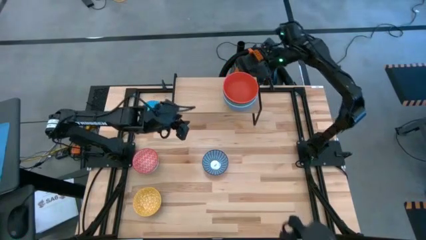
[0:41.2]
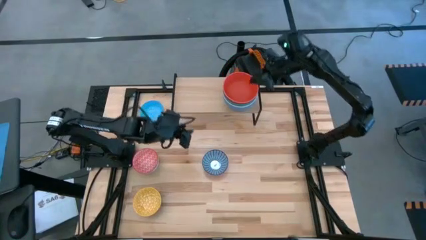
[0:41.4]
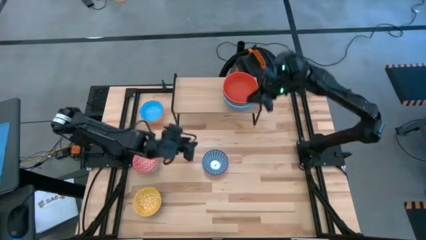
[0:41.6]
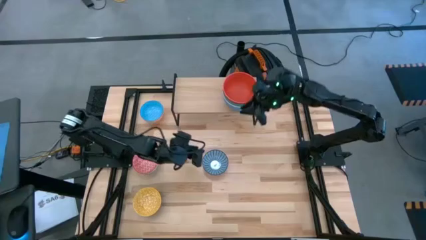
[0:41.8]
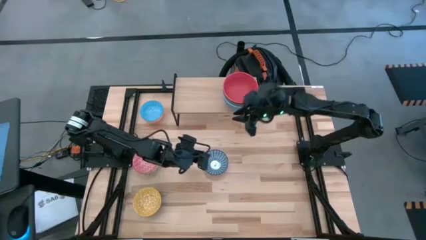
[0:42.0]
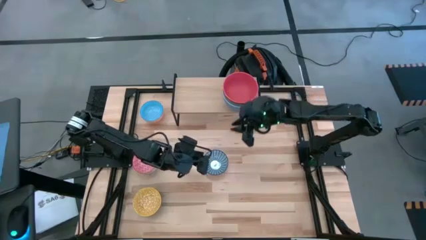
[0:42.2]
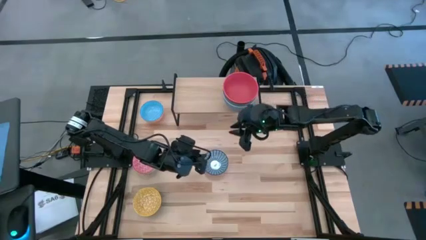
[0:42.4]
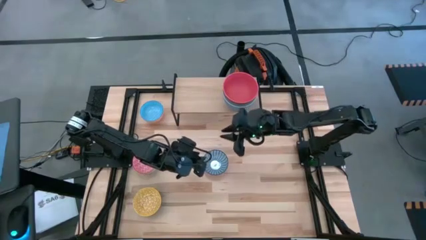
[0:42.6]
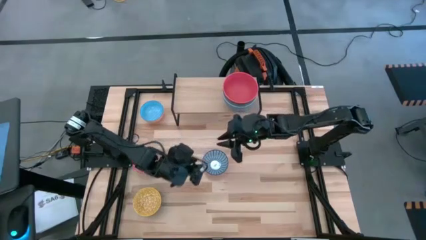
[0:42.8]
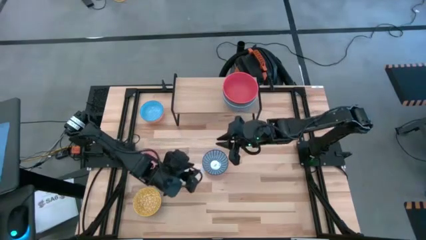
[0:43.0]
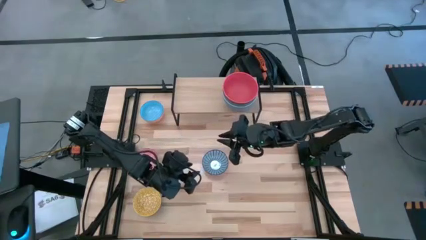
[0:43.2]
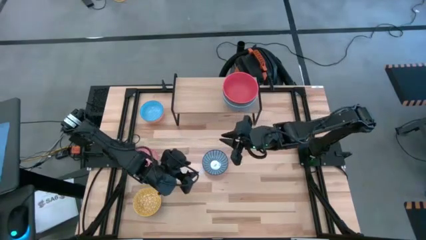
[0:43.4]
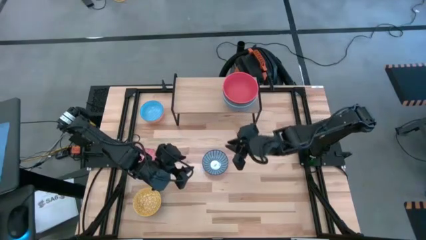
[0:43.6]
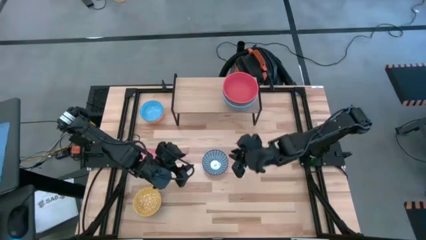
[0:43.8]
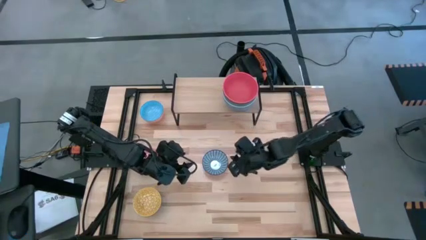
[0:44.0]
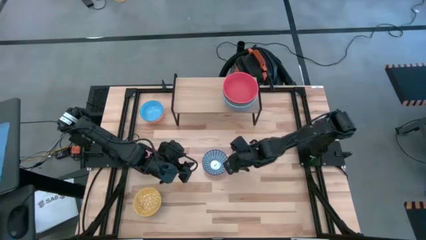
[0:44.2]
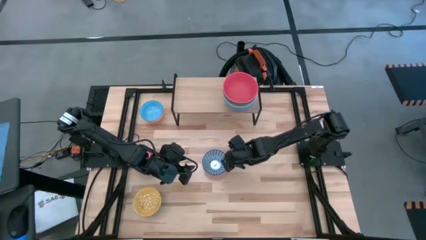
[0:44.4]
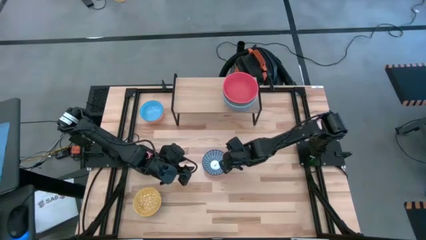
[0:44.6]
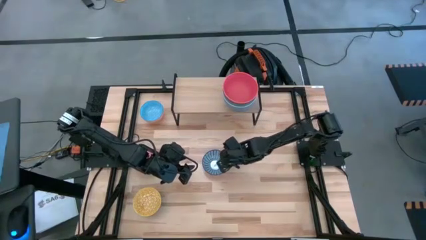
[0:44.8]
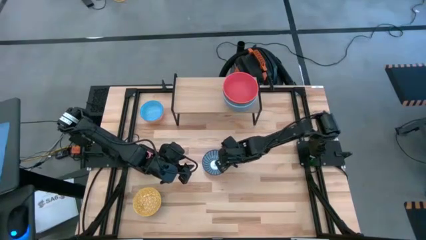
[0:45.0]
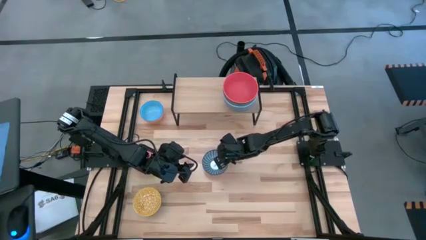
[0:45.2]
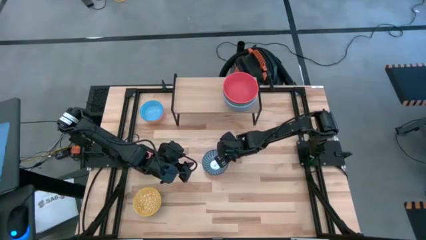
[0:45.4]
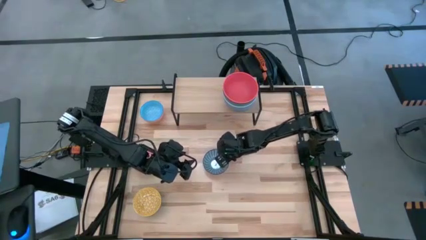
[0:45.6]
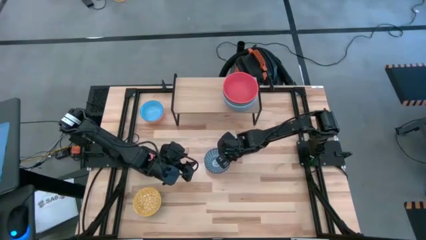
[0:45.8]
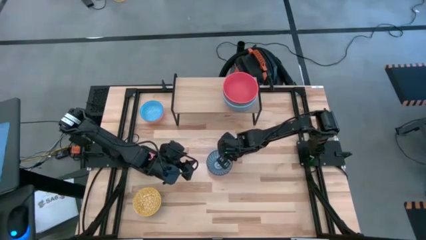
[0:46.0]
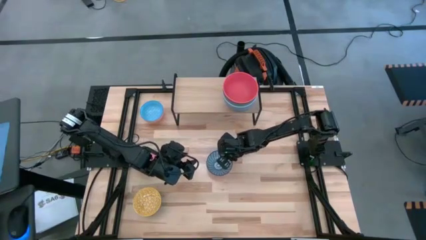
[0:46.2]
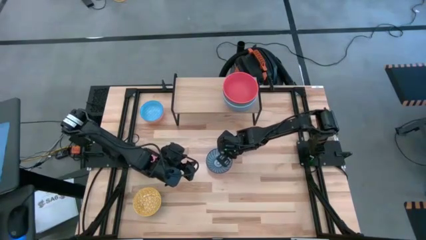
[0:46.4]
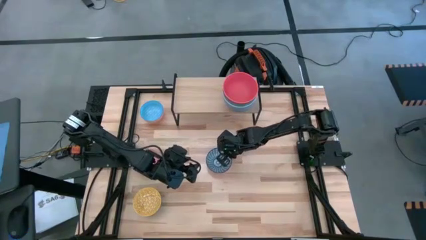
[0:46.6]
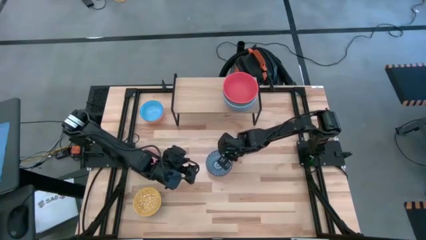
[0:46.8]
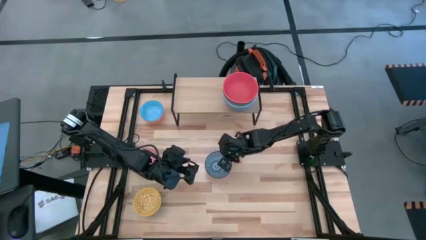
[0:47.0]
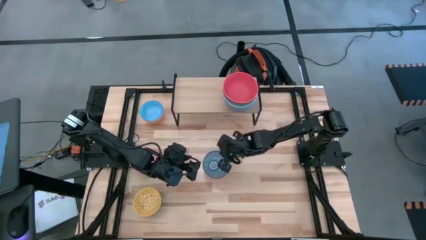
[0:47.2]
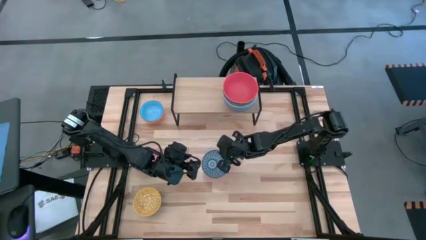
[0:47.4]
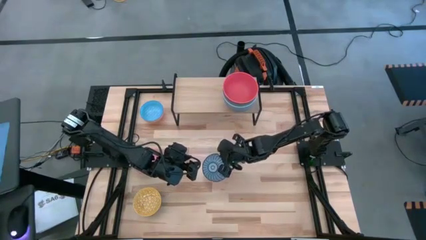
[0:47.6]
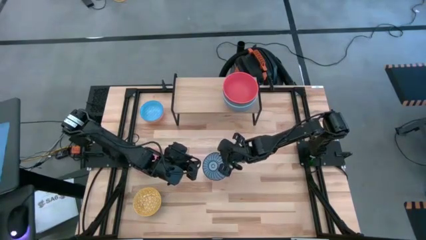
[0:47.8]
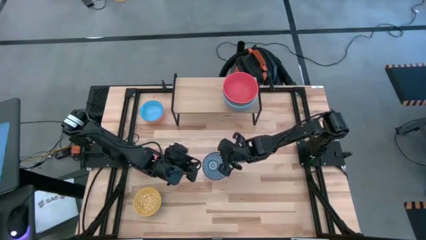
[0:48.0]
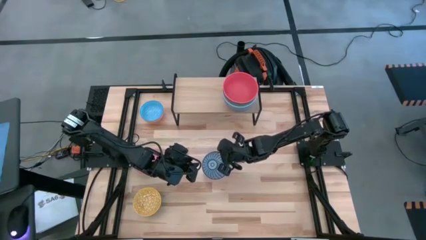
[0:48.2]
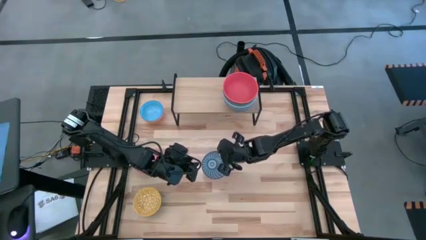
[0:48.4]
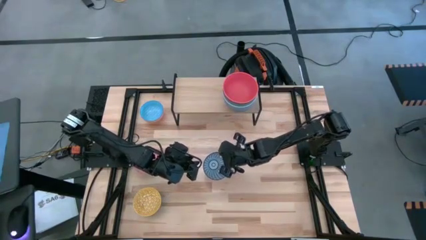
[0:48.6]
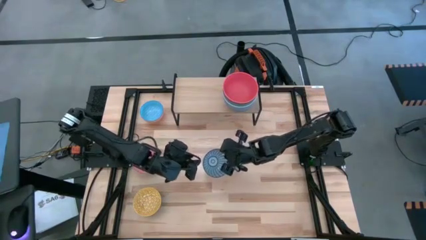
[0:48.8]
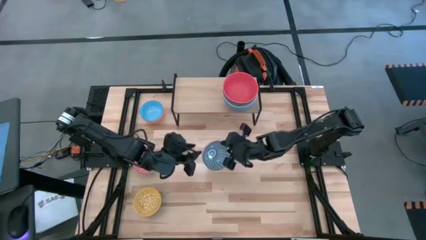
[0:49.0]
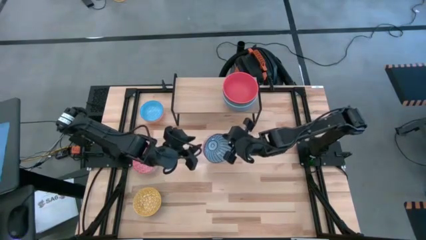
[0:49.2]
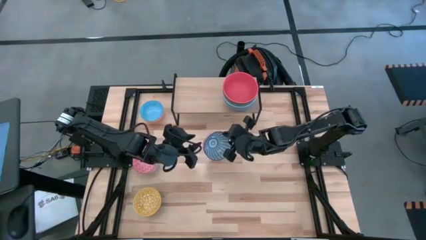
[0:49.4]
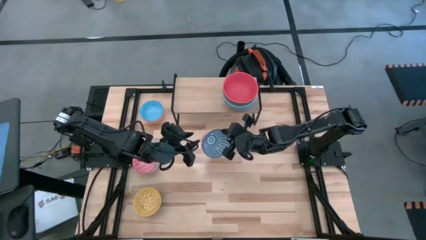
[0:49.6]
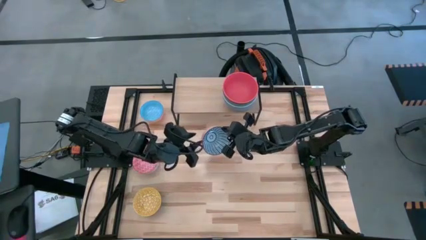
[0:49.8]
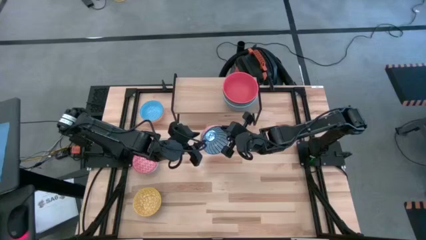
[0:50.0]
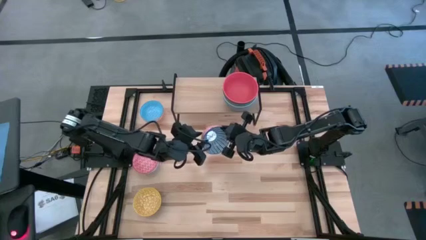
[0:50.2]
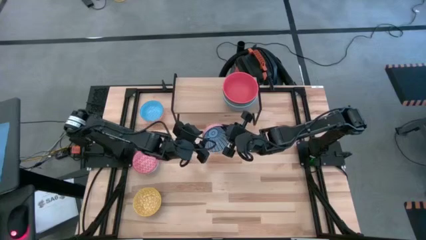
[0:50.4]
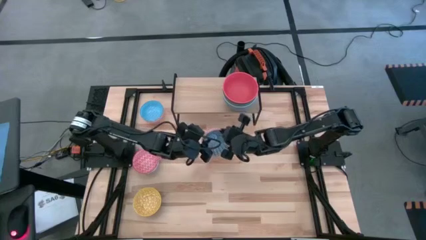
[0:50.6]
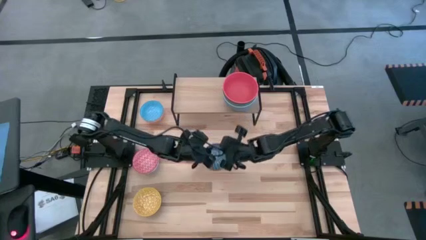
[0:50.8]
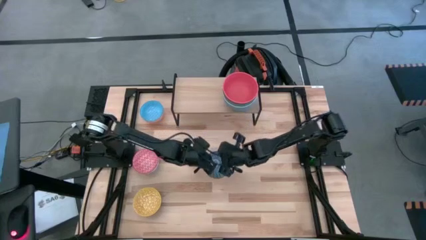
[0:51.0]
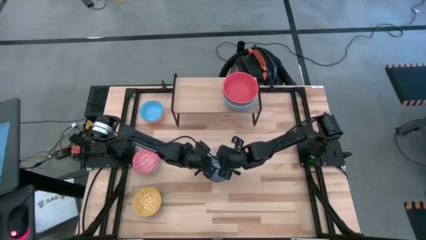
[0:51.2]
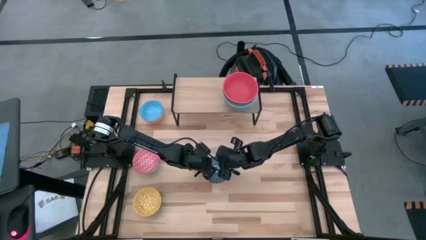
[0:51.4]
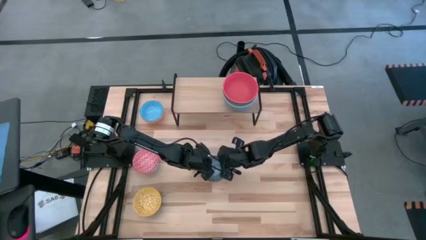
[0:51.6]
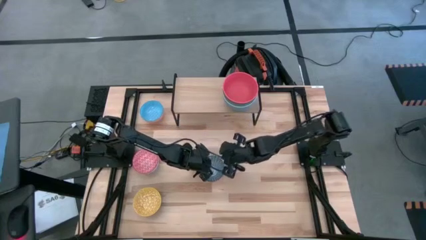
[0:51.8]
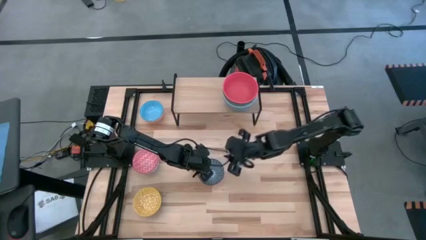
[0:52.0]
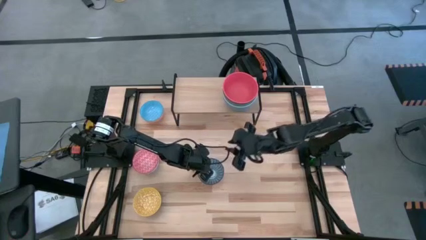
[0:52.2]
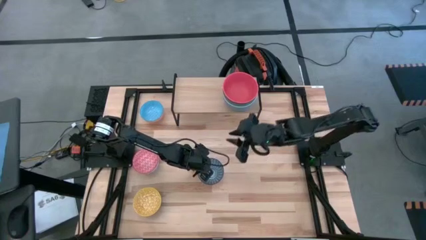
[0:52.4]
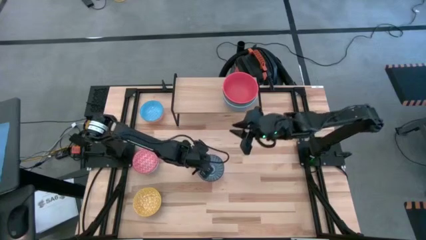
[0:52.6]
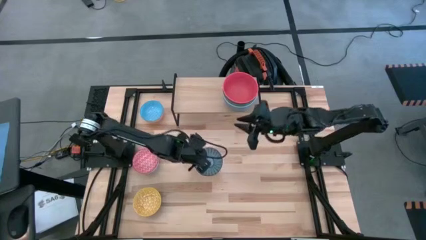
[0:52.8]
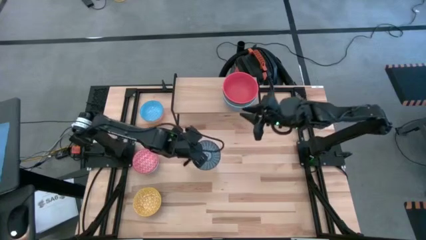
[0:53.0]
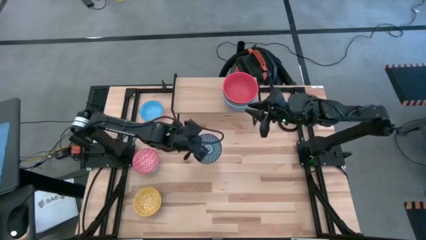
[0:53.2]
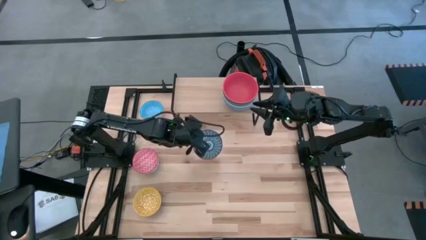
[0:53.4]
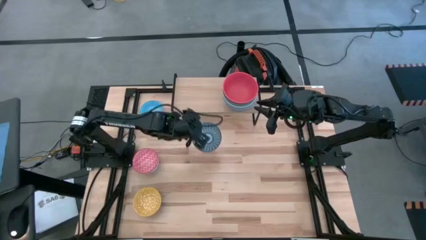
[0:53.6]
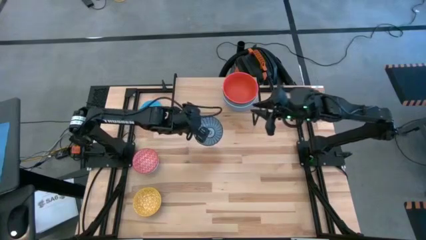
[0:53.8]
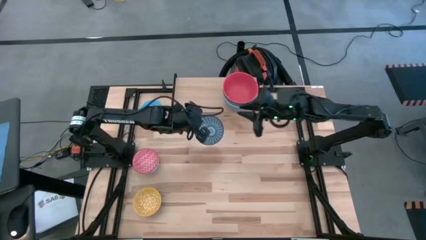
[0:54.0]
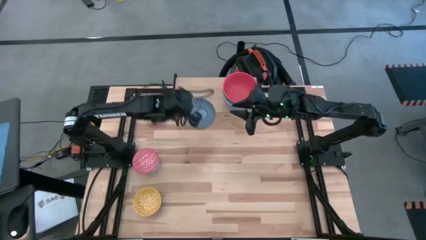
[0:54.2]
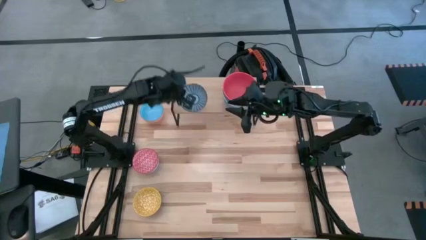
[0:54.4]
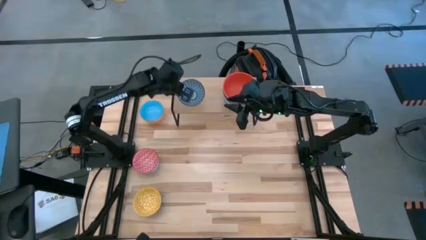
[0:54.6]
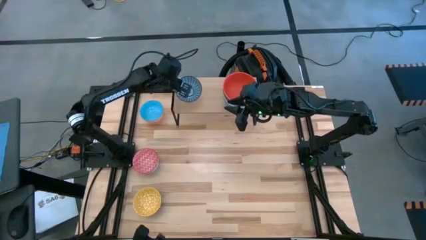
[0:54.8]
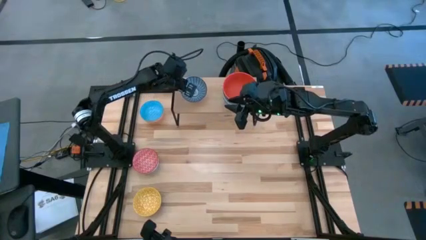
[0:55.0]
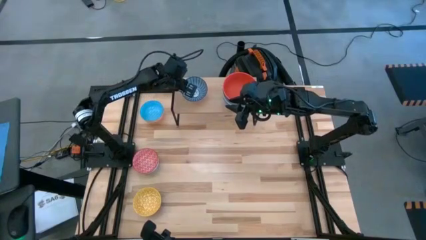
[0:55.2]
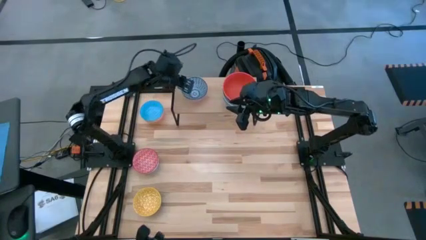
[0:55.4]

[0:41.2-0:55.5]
Task: Place and stack bowls onto a shelf
Put the patterned blue bowl on the shelf
